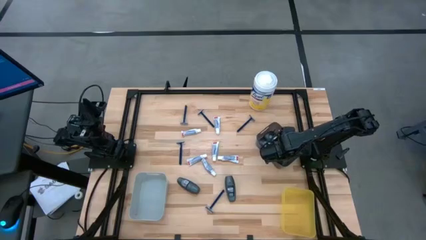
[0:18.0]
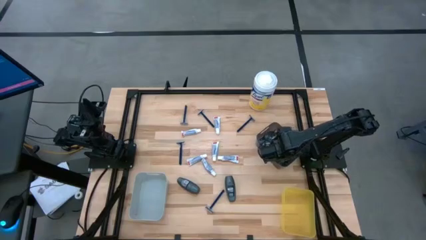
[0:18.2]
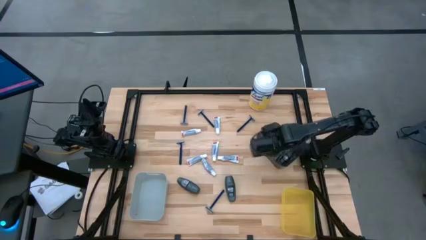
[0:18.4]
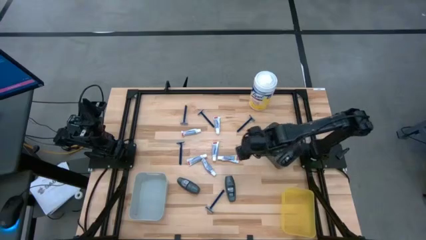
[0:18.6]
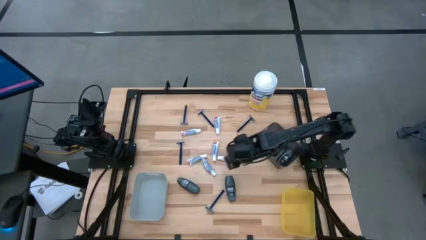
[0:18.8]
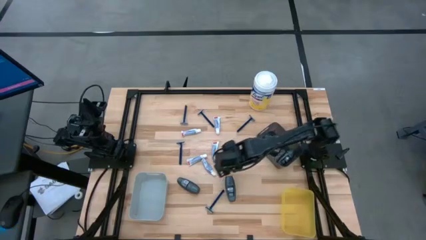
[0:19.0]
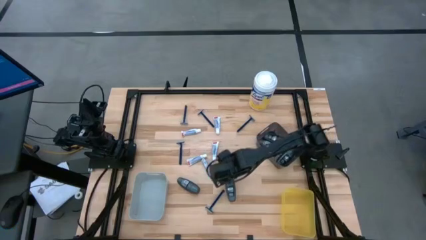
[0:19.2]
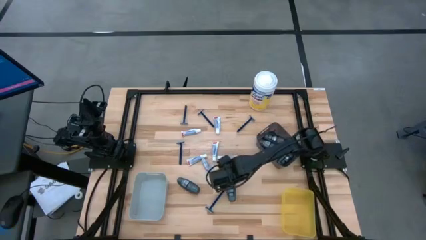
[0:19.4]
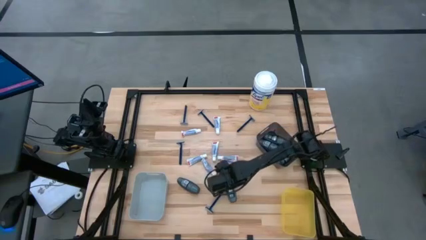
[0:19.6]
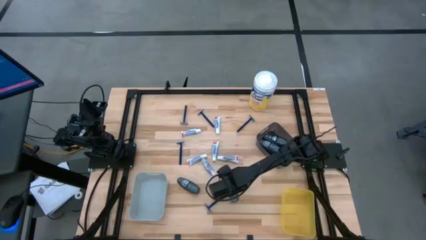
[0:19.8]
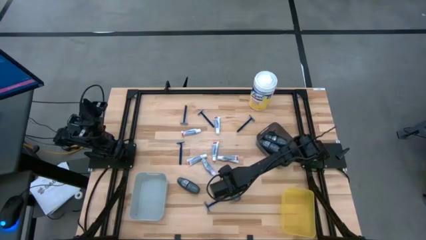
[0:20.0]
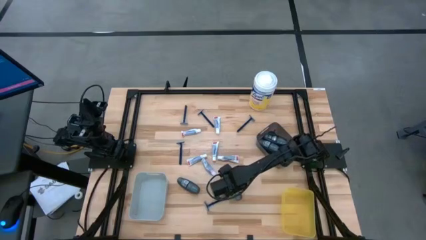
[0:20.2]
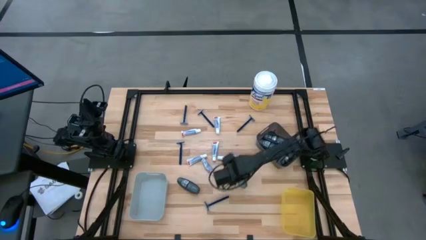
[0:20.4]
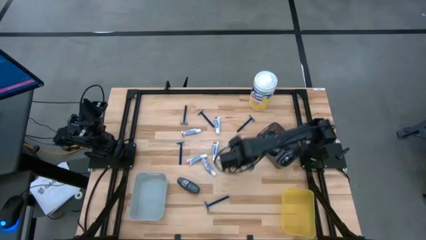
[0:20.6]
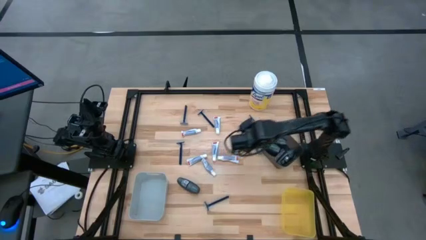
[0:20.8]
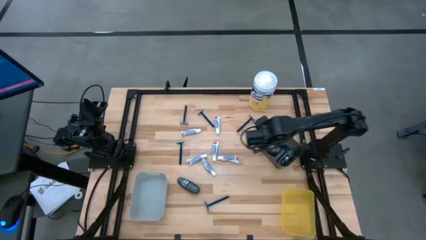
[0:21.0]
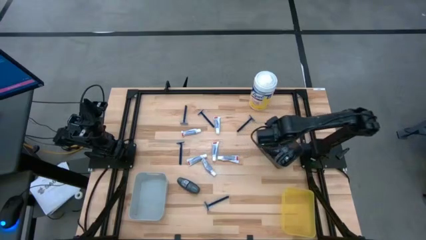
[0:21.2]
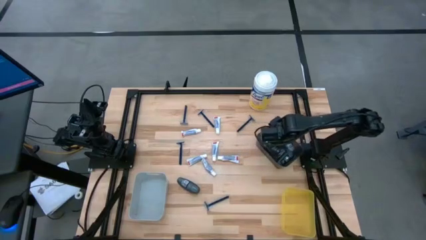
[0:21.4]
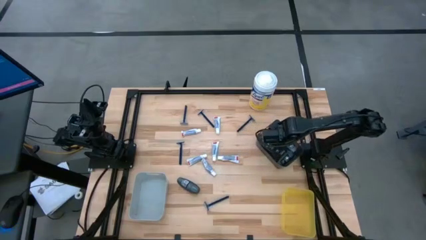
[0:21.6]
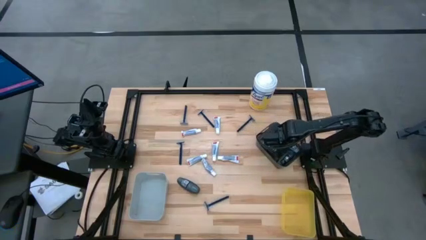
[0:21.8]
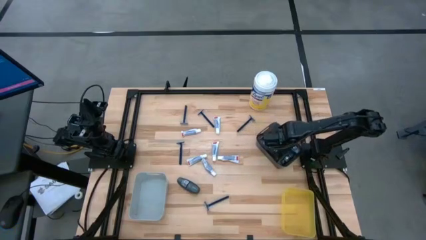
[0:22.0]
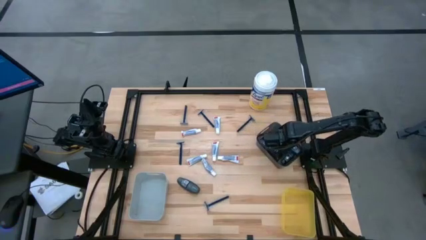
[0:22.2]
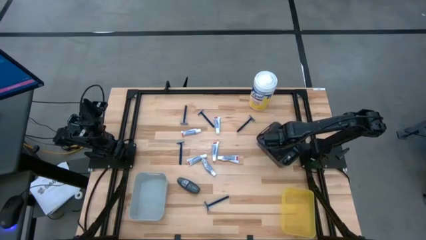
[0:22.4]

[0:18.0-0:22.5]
Task: Pick & Place Travel size toiletries
Put the gray deodorant into the black bin

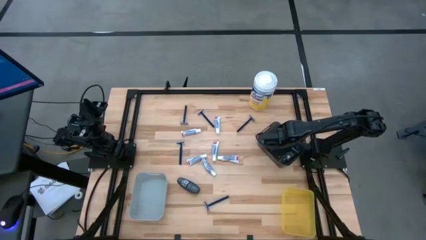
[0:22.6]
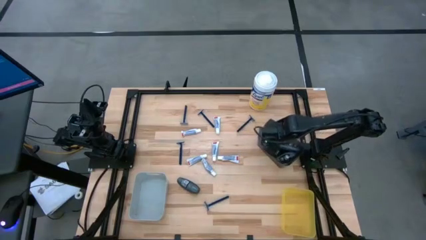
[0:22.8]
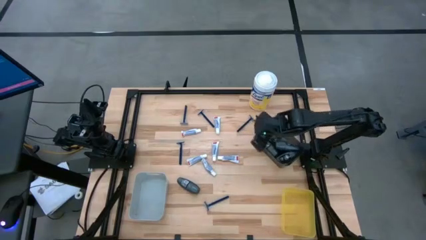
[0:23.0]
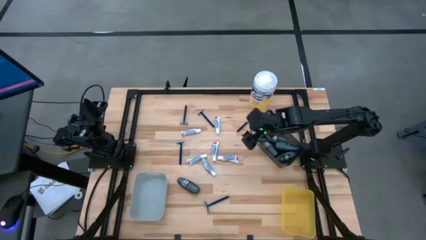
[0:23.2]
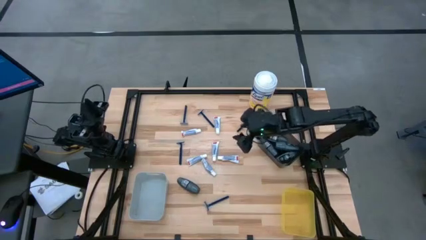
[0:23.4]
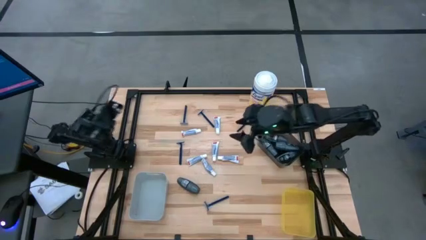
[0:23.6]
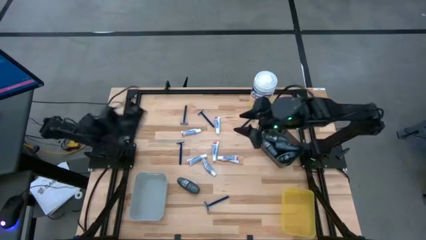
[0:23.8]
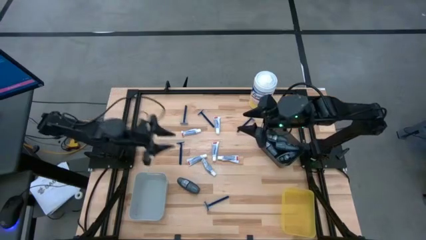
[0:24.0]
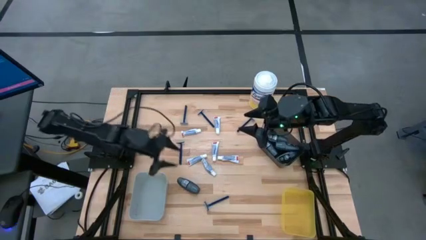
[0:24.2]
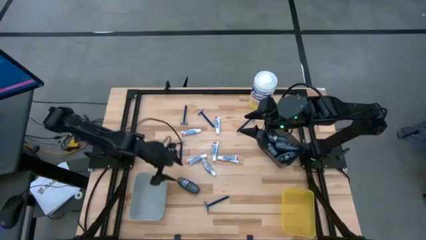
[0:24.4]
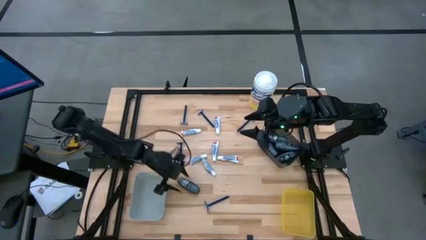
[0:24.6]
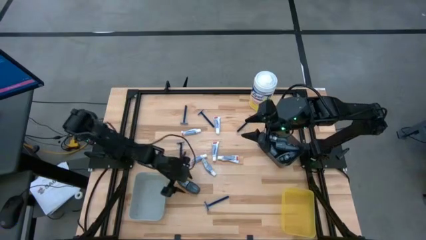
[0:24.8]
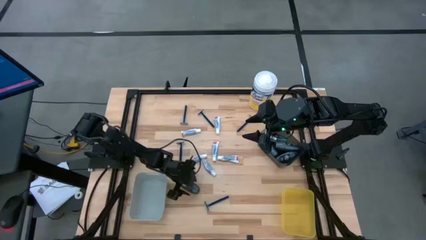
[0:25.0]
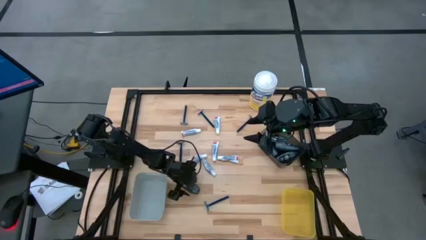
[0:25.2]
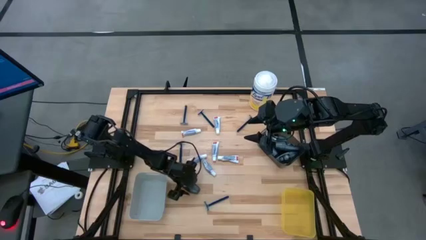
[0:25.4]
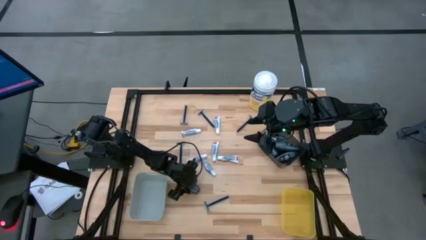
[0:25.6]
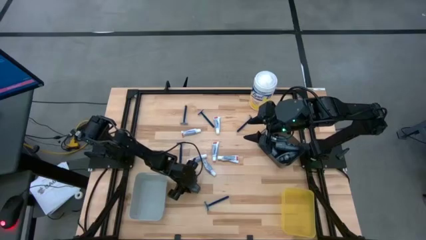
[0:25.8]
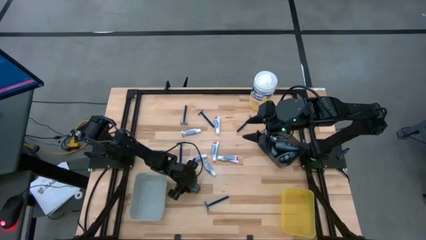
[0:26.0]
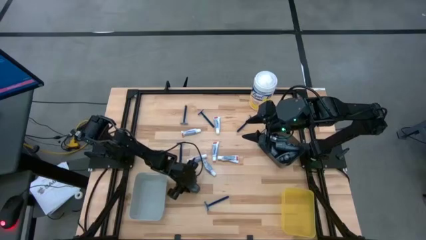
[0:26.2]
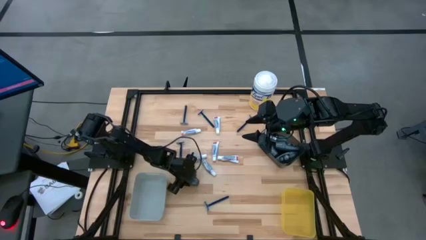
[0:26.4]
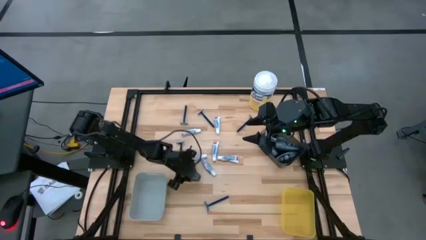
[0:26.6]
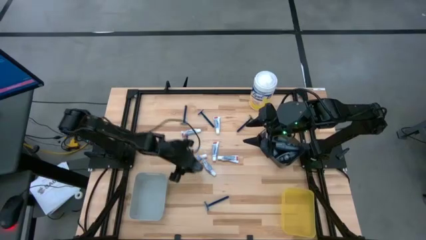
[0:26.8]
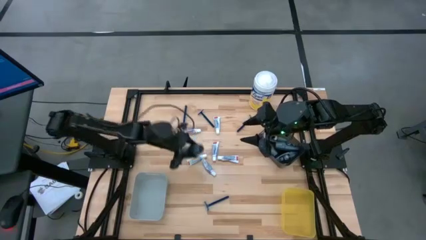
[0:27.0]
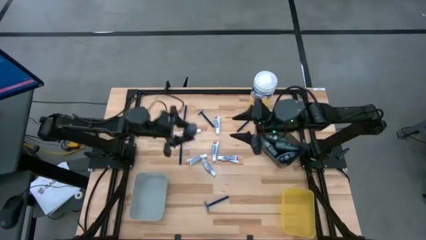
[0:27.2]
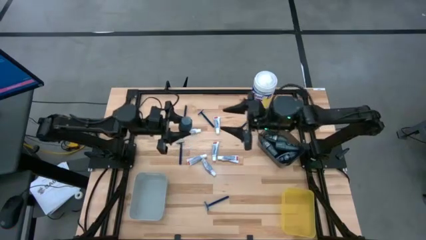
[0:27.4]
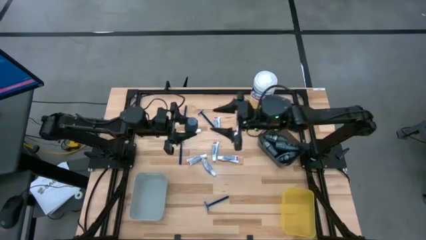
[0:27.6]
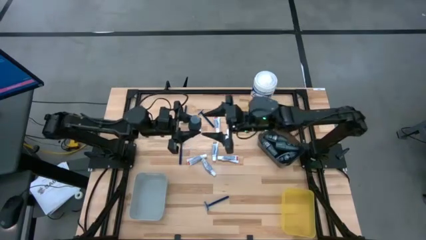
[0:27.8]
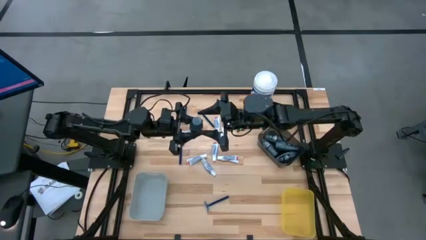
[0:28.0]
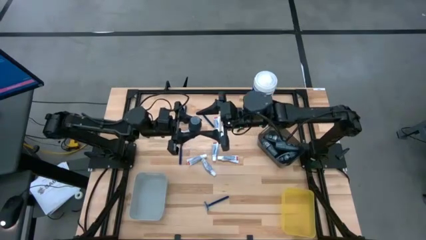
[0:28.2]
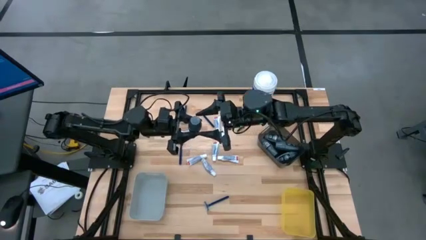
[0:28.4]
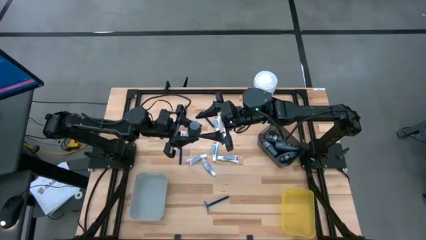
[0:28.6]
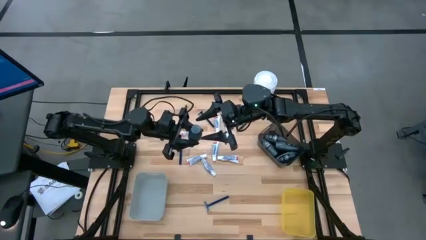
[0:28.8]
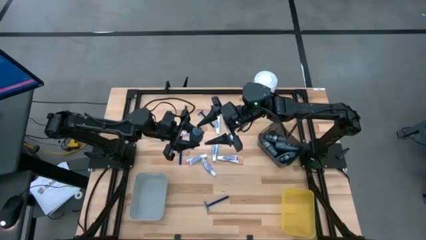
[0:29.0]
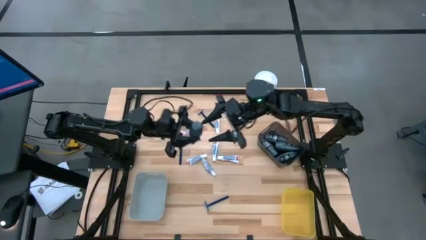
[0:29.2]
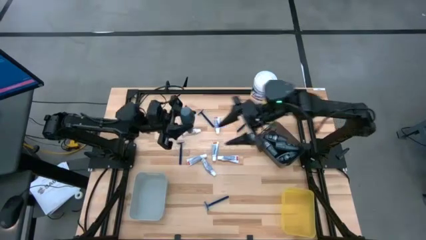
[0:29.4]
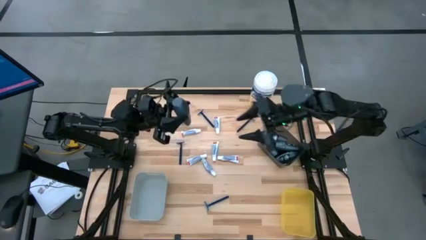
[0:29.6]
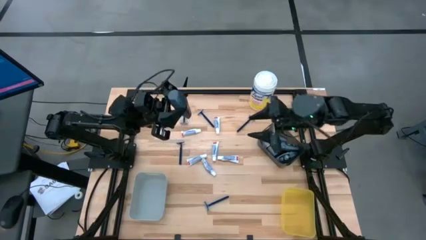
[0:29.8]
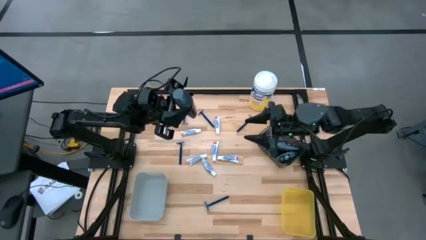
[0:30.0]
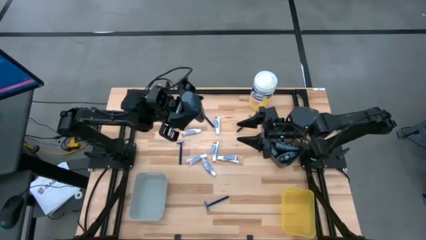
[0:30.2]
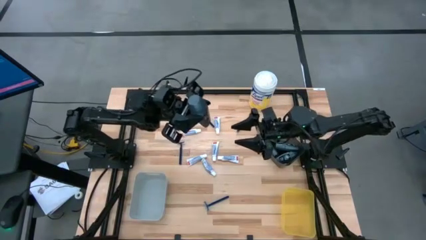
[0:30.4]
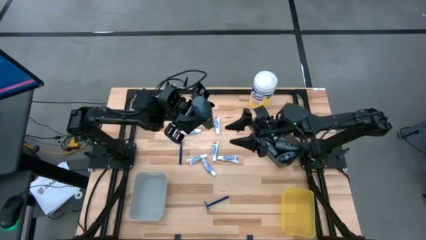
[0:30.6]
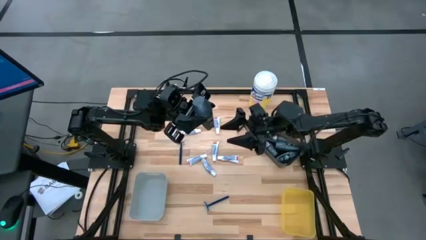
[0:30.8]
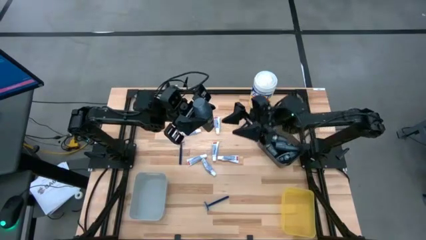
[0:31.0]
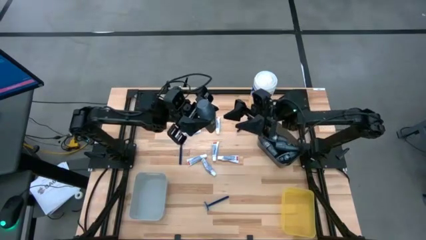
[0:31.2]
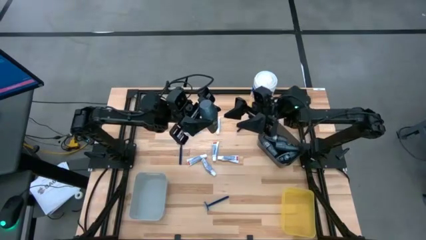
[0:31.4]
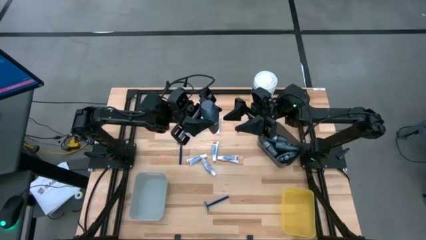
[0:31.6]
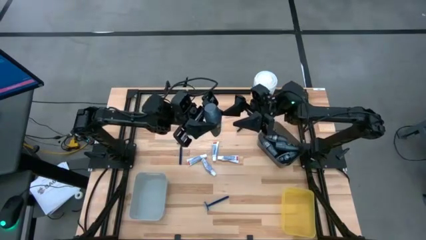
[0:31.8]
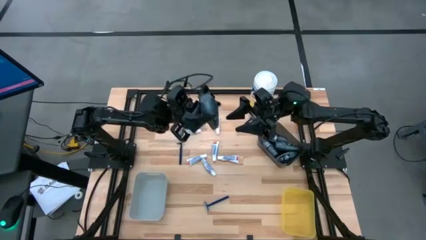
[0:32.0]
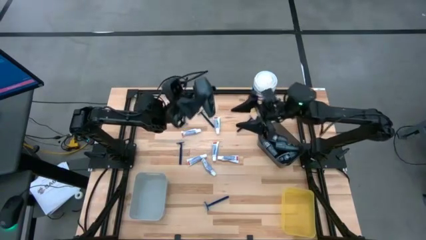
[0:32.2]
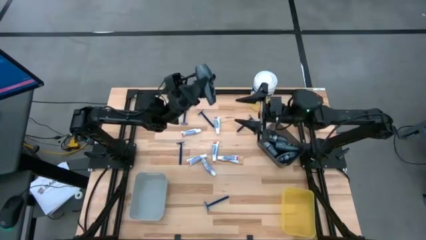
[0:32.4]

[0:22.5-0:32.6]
Put the gray deodorant into the black bin

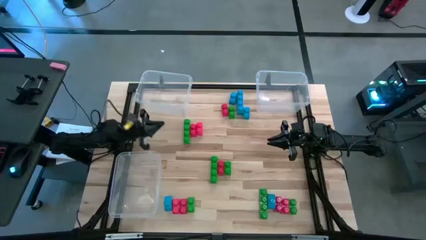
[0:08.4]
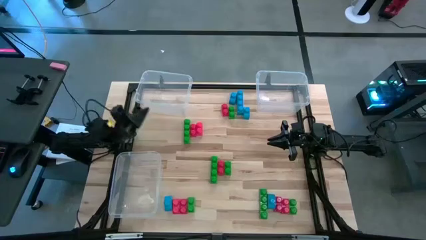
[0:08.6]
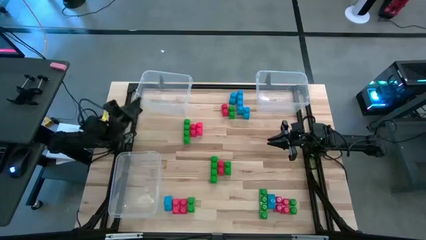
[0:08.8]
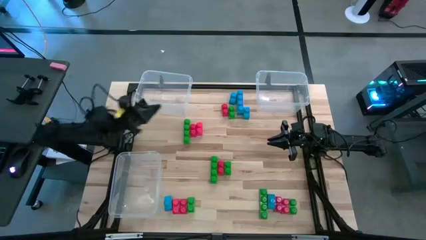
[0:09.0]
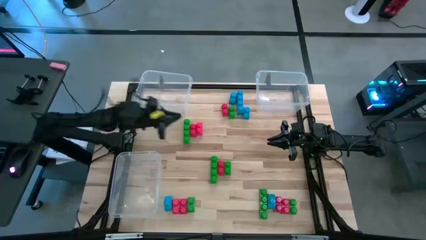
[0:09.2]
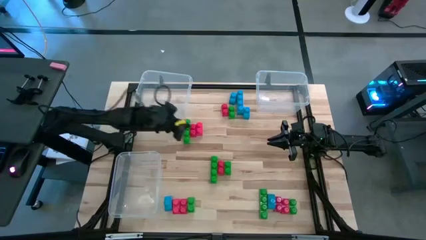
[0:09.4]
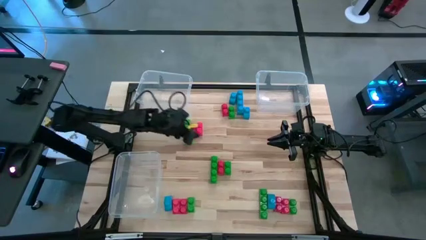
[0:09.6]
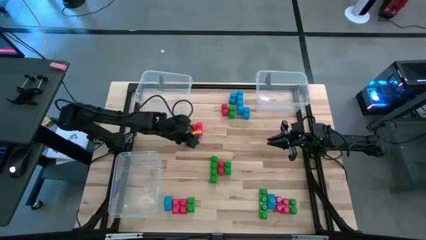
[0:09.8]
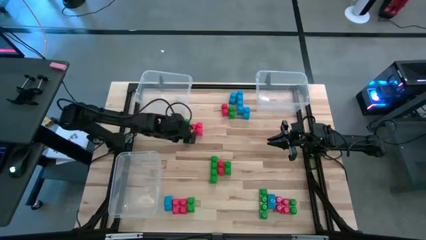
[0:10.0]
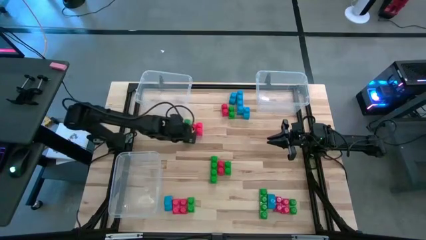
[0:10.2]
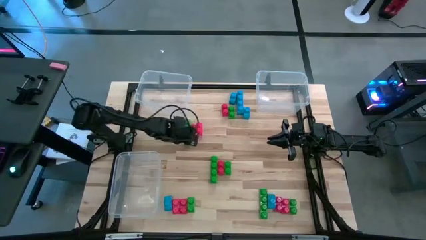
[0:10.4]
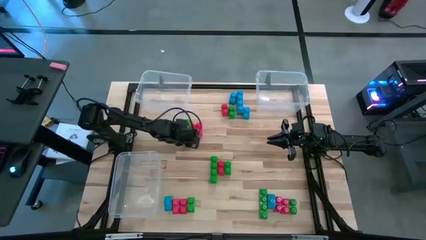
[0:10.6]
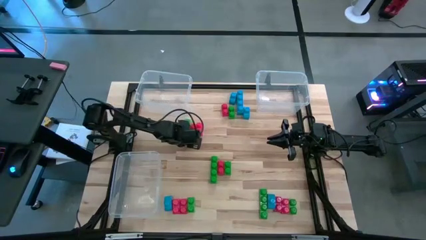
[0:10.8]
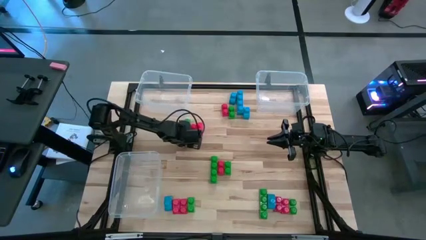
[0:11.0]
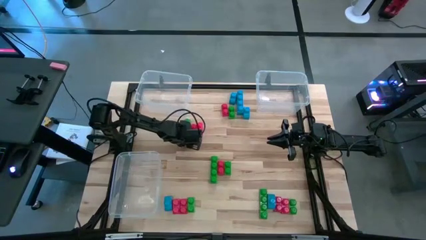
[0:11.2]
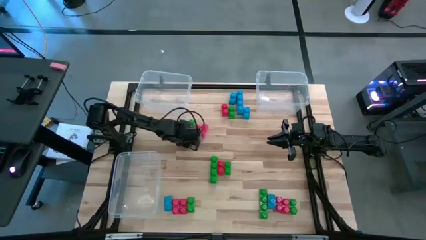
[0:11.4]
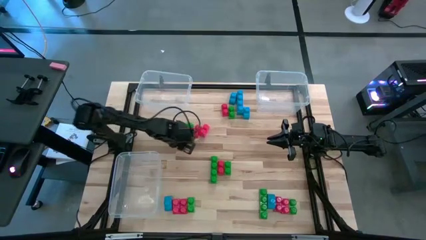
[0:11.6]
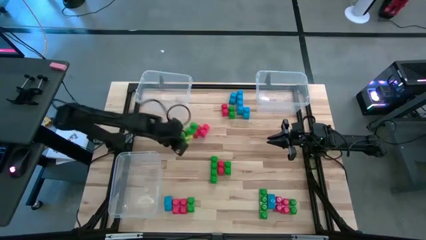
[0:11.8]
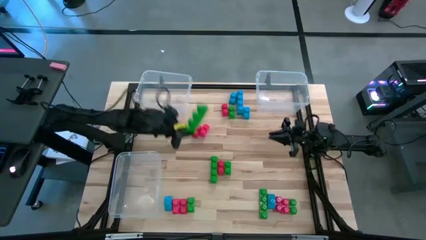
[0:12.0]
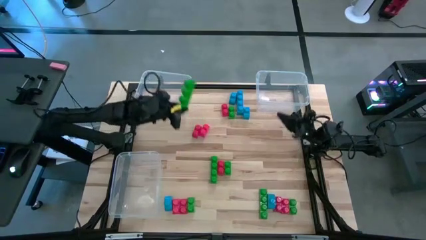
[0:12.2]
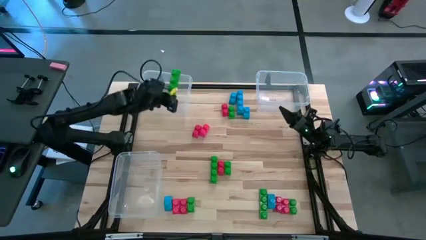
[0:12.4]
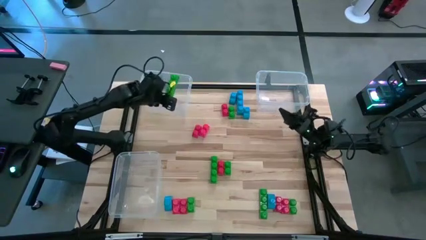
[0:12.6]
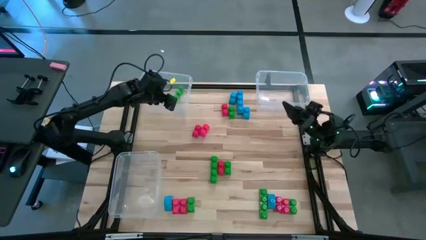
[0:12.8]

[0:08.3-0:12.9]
Task: Sort blocks
Put the green game piece into the top left transparent bin
